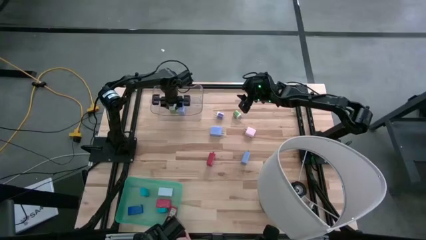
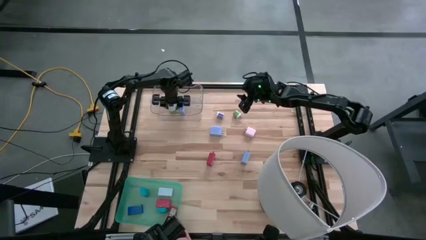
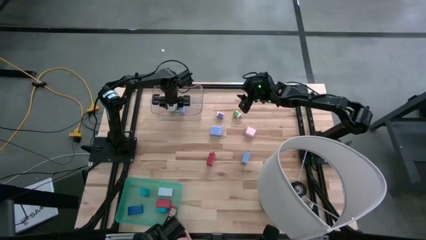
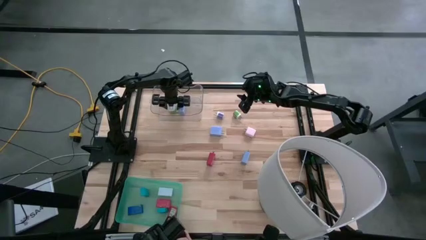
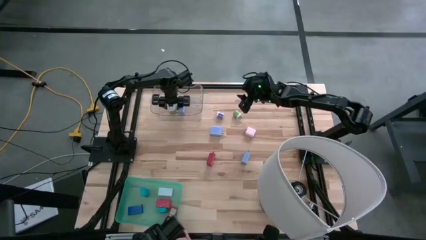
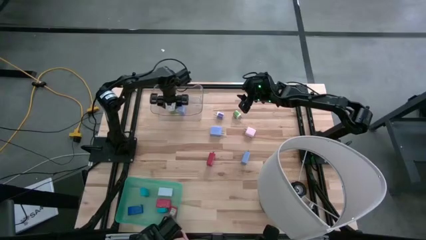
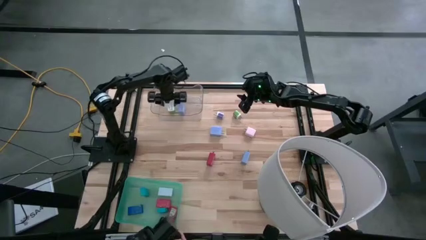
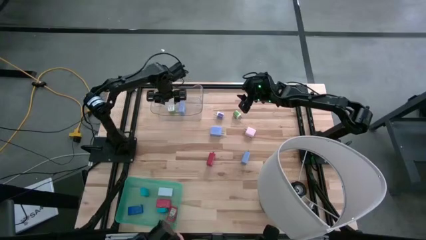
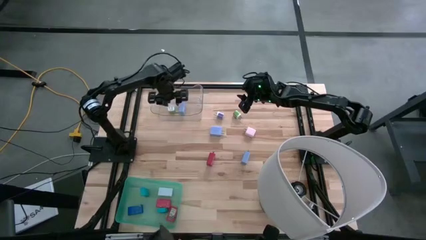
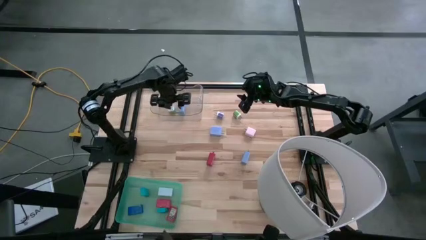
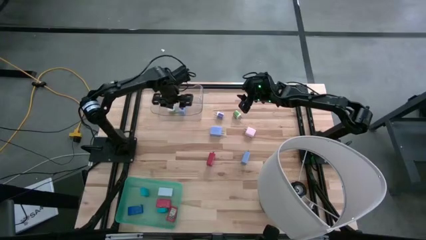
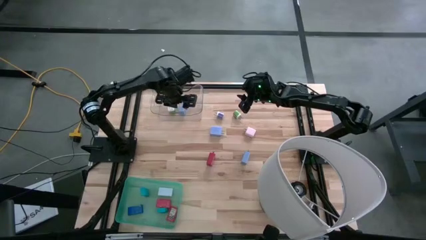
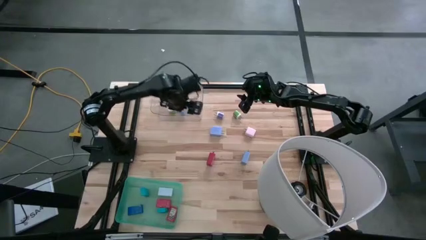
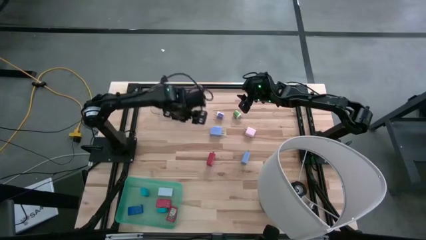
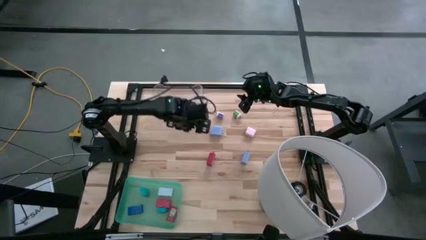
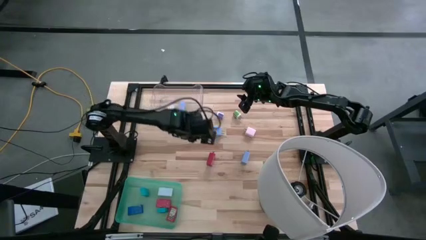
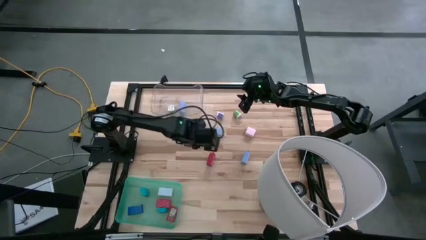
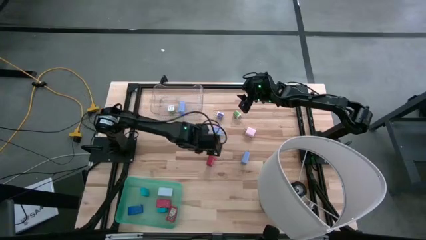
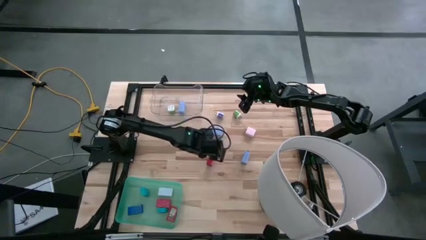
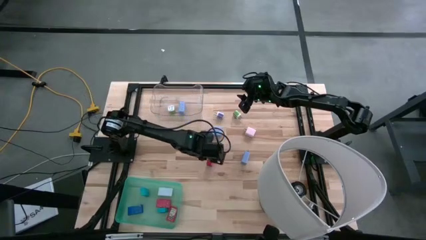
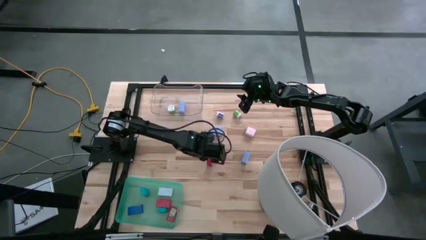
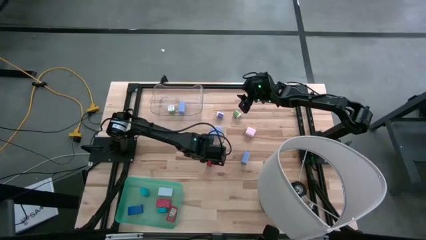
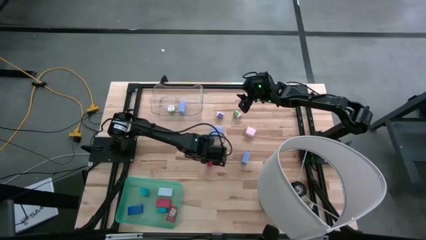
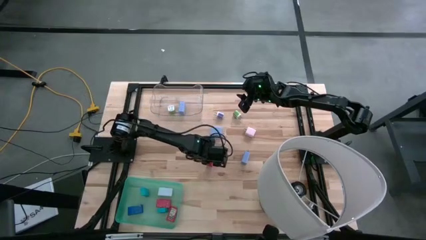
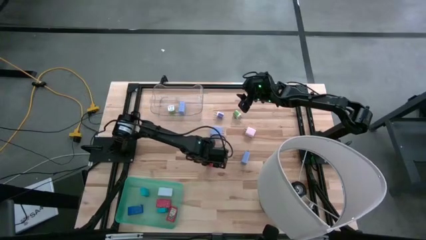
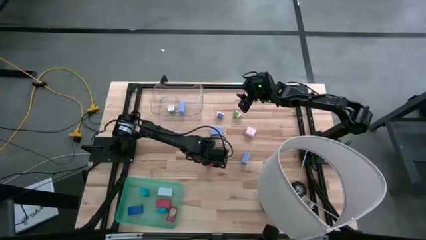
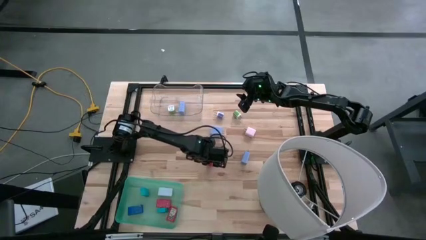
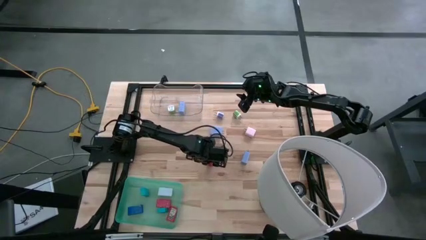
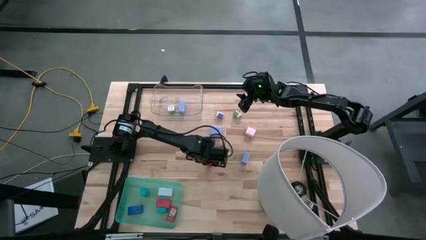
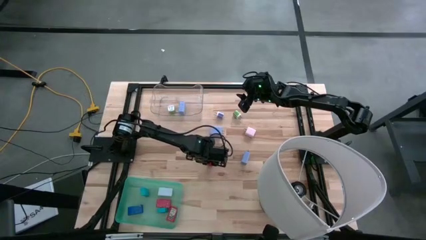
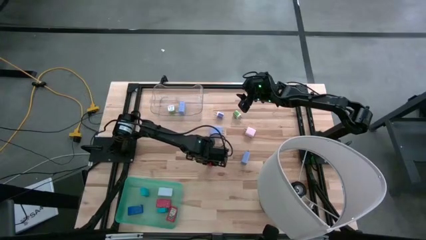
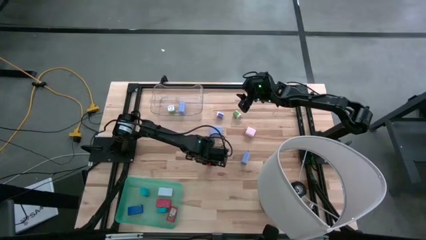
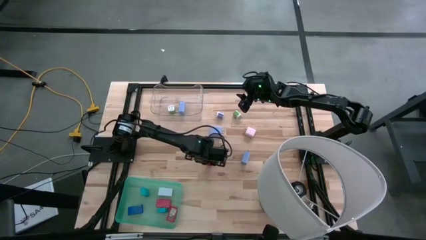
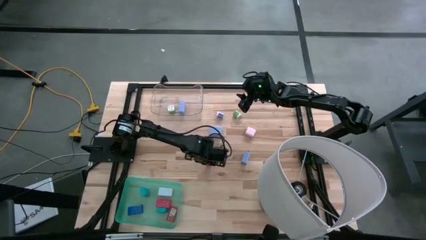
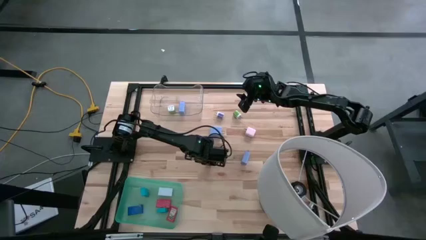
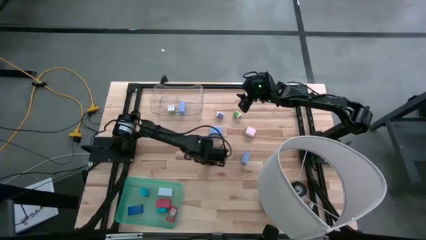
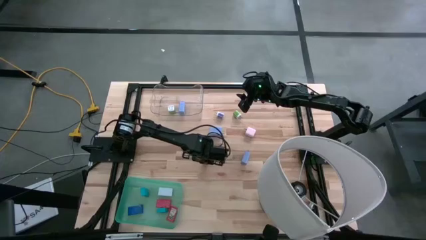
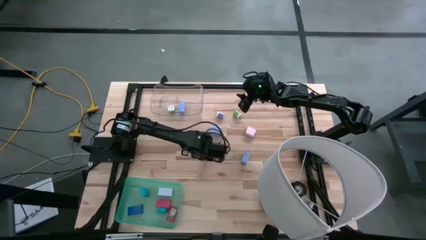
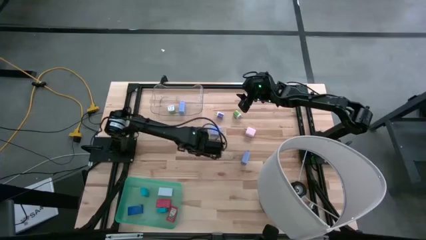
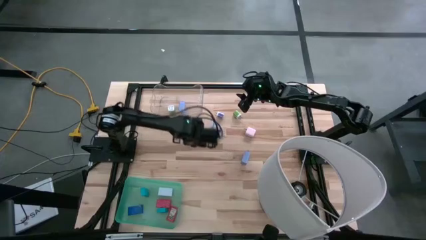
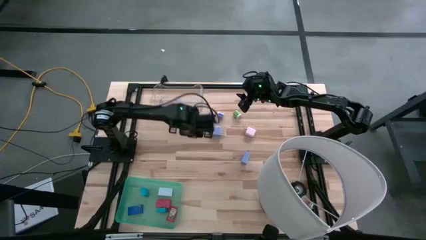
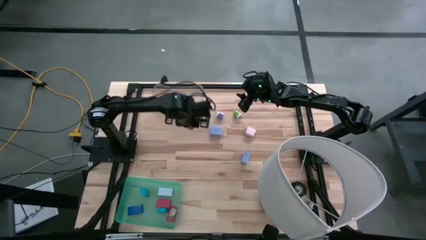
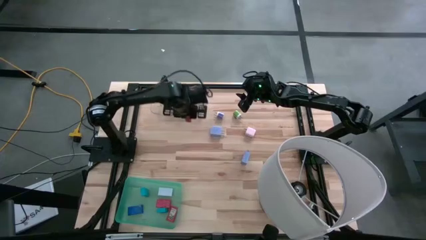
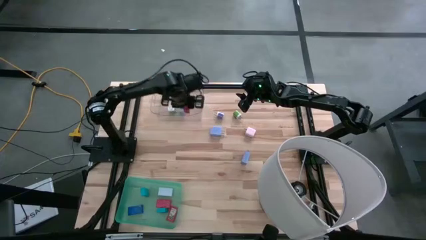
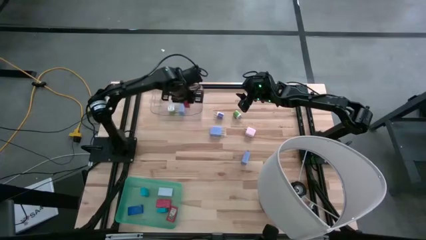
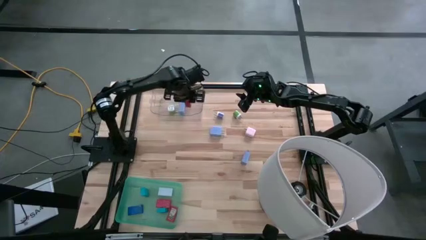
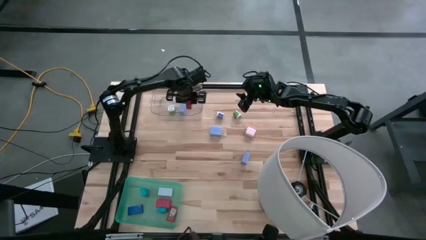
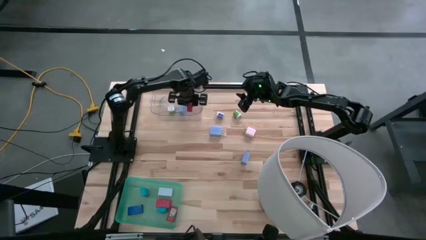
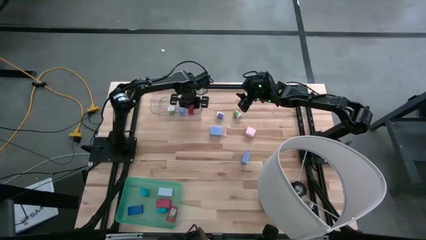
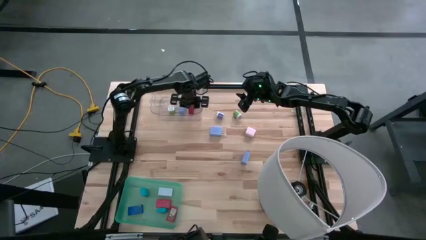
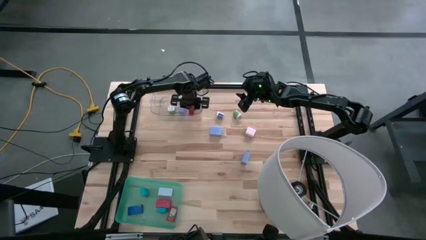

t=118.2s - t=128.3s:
Task: Pick & Place Office items
Put the red charger adapter into the transparent bin
